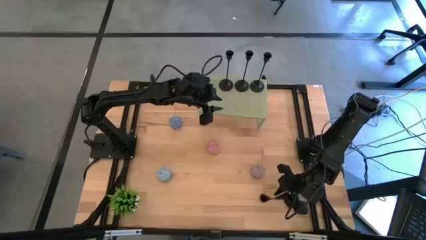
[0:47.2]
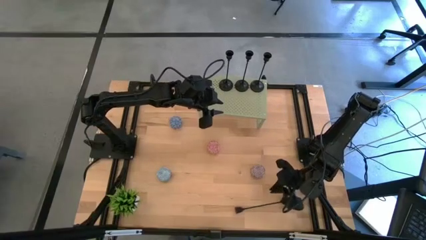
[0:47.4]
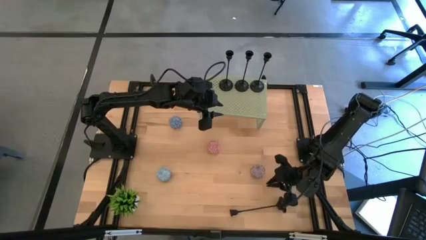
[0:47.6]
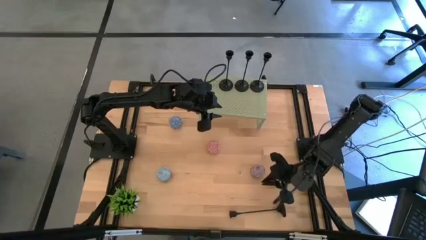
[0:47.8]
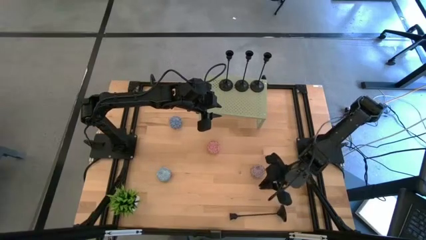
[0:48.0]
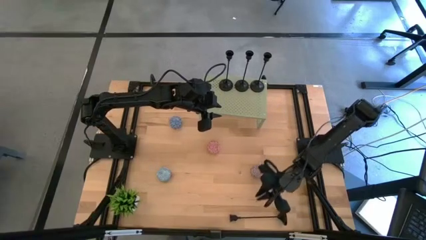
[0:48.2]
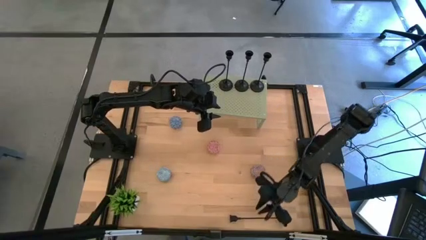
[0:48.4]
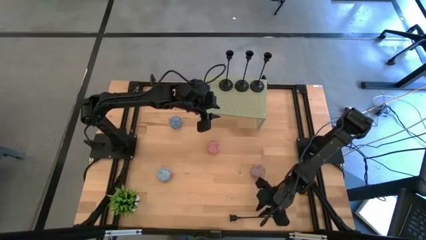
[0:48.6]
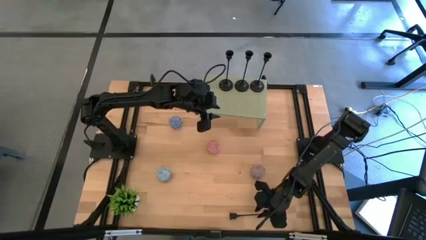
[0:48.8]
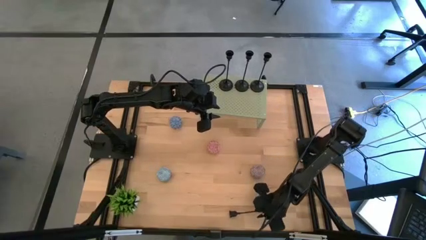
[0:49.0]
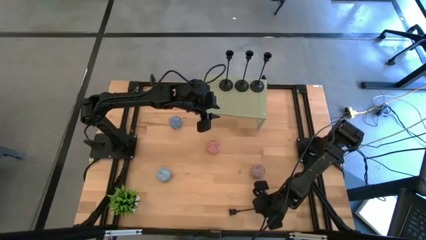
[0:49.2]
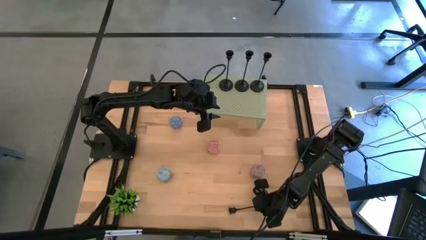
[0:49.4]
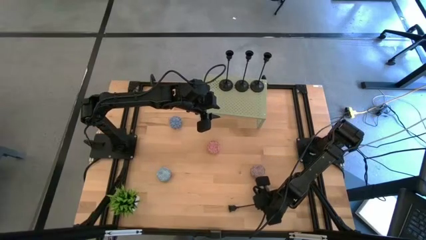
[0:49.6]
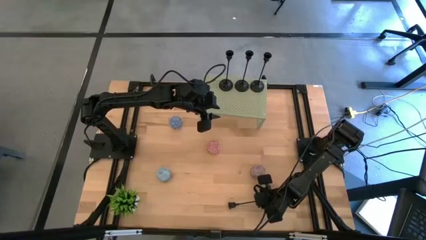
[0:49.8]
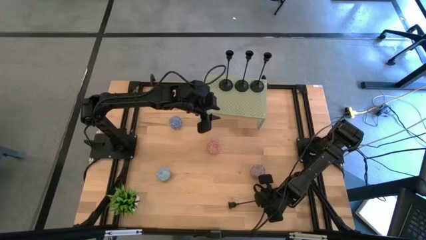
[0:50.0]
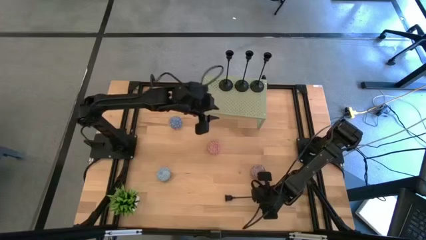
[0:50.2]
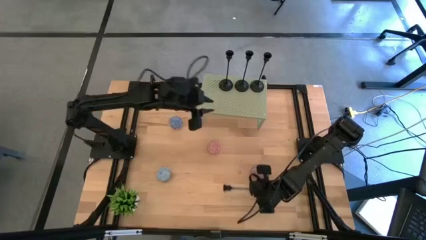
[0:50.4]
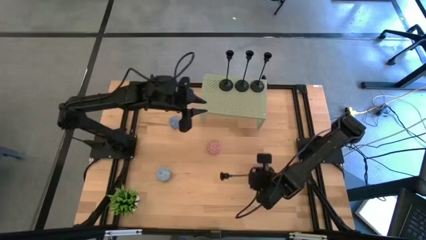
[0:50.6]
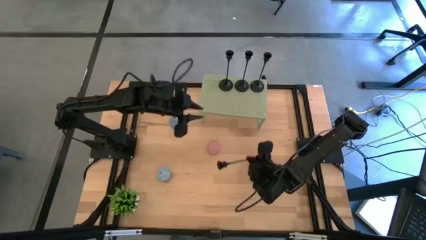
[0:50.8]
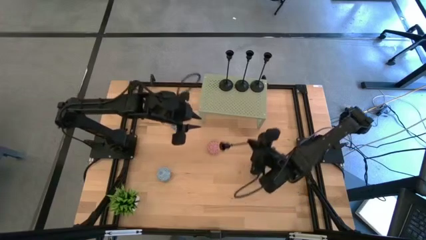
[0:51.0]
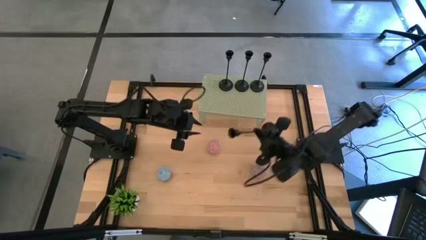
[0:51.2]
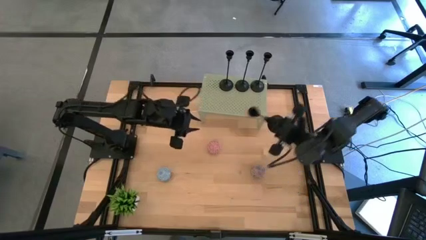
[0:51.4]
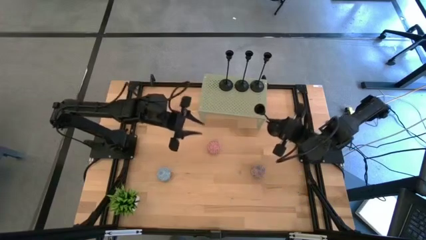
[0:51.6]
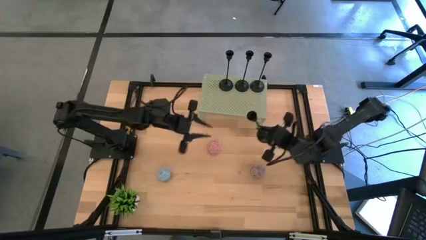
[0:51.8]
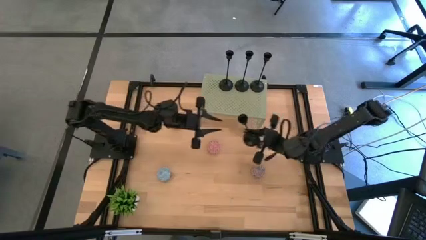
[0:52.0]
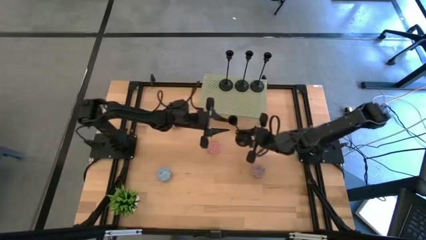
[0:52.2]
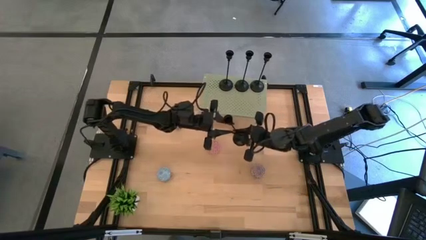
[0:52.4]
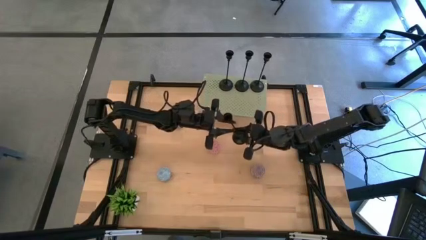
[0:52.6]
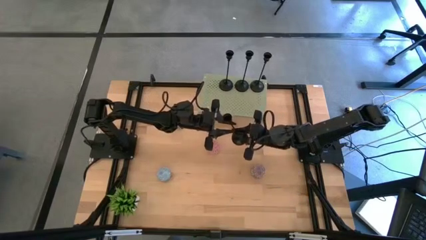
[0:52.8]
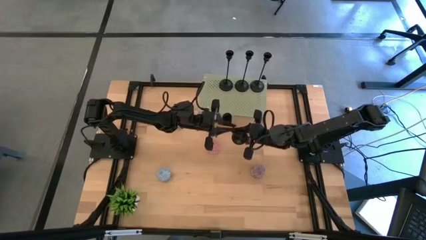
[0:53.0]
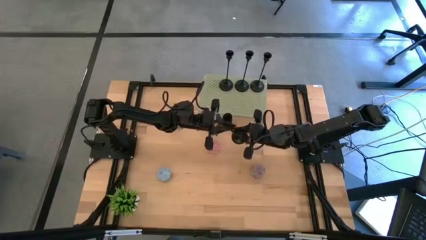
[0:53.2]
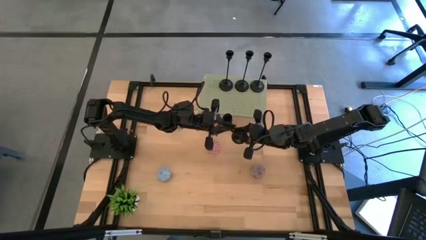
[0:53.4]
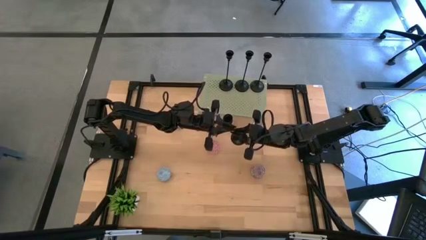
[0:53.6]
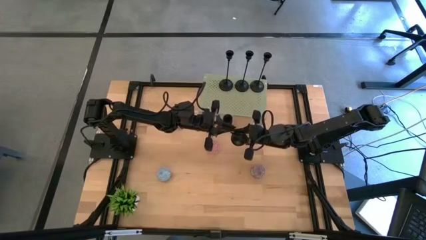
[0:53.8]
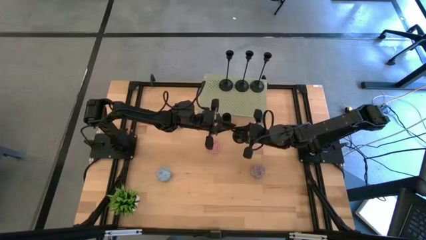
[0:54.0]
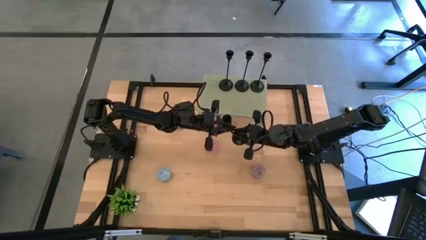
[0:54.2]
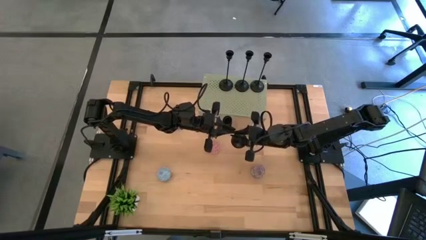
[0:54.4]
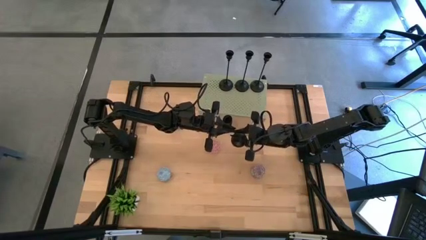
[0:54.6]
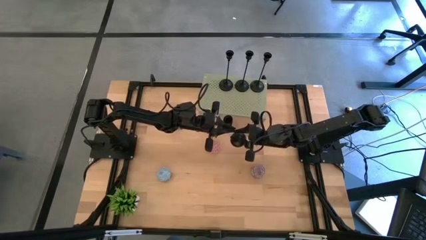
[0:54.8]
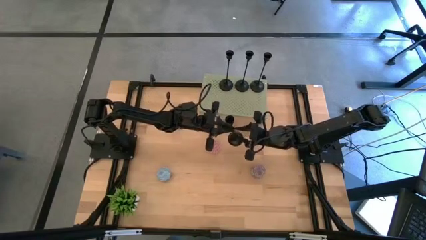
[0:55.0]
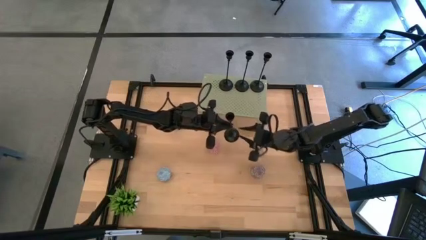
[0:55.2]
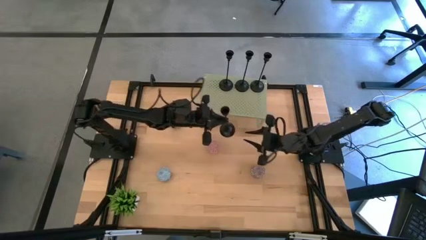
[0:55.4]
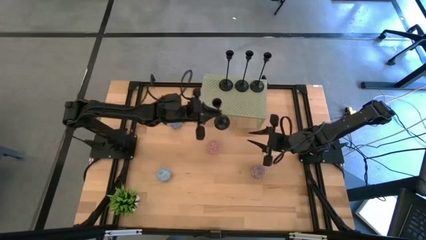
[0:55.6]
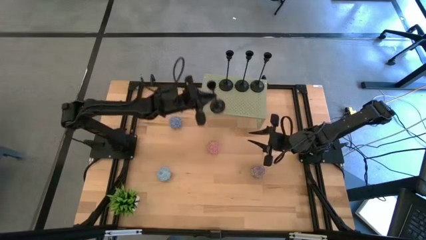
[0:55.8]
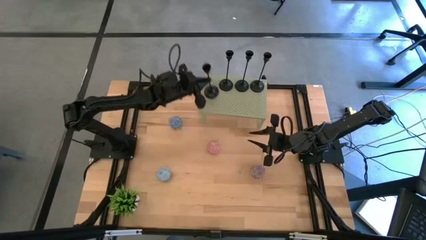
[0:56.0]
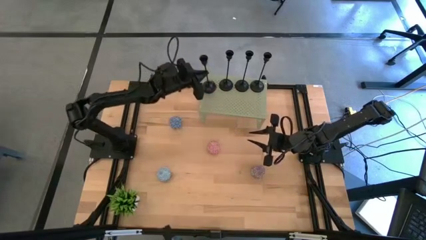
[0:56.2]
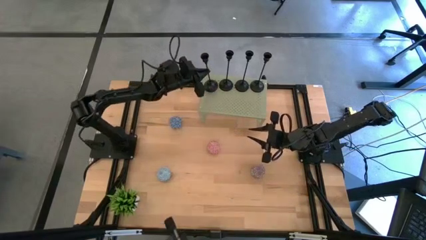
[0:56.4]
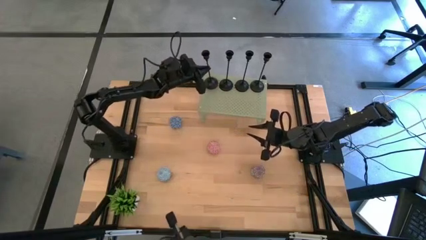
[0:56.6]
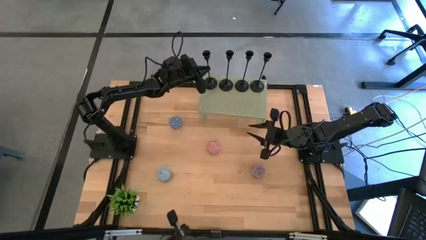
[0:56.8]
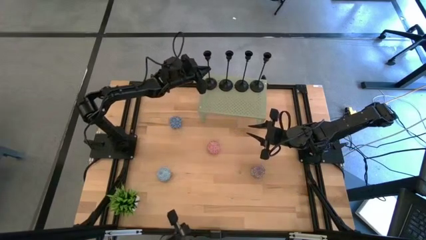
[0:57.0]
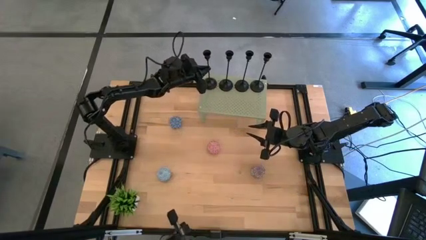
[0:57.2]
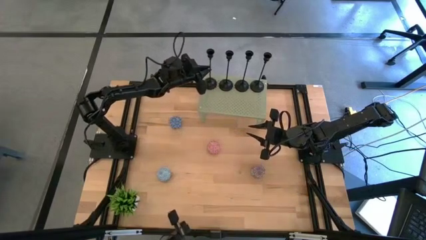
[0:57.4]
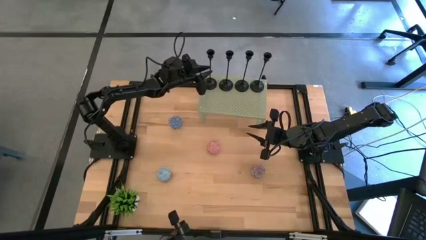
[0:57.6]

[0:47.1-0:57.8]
Task: Pick & Place candle stick holders
Put the black candle holder on the shelf

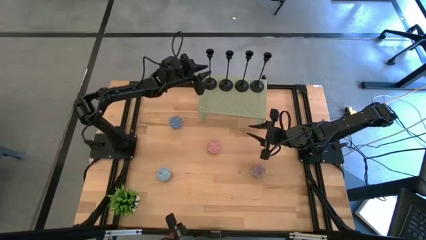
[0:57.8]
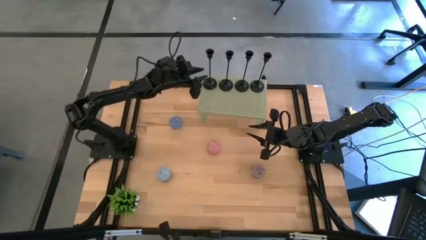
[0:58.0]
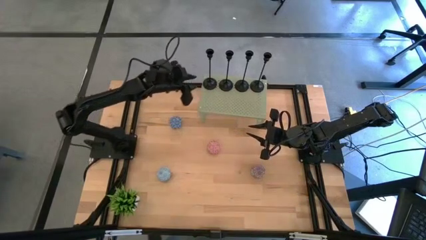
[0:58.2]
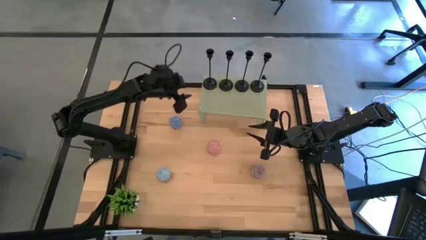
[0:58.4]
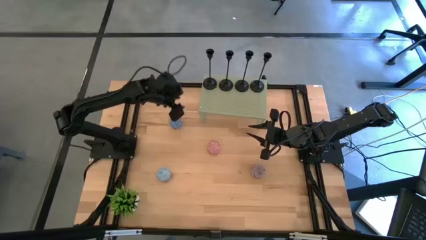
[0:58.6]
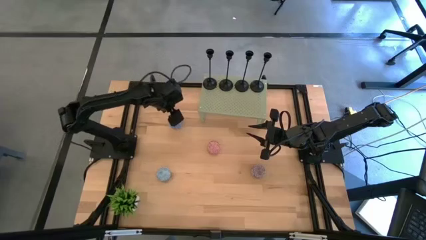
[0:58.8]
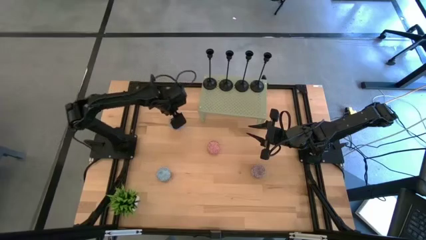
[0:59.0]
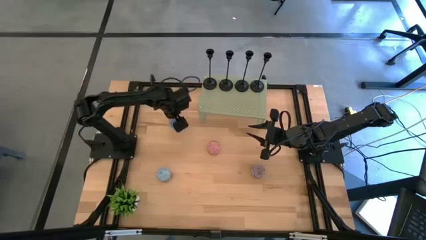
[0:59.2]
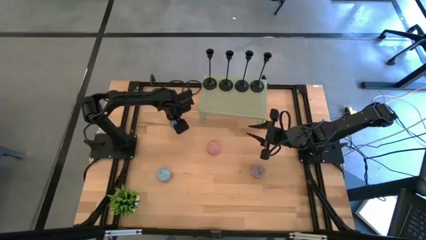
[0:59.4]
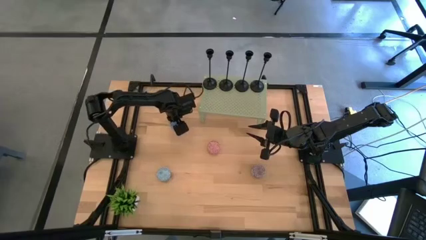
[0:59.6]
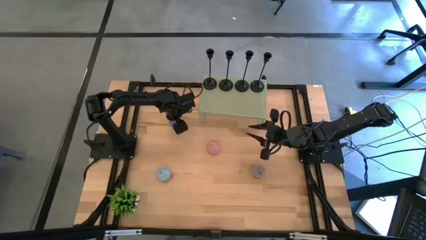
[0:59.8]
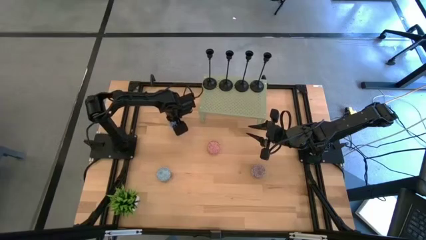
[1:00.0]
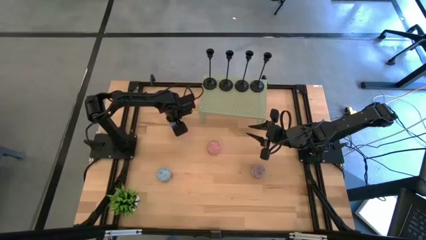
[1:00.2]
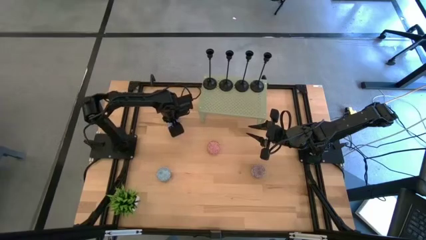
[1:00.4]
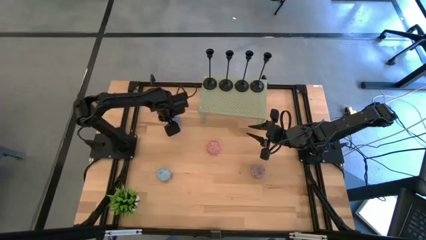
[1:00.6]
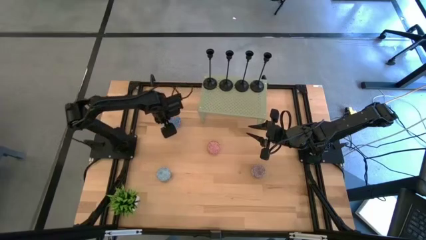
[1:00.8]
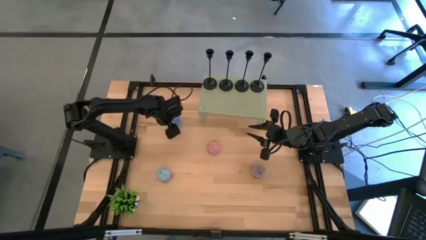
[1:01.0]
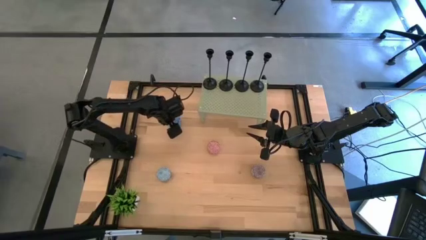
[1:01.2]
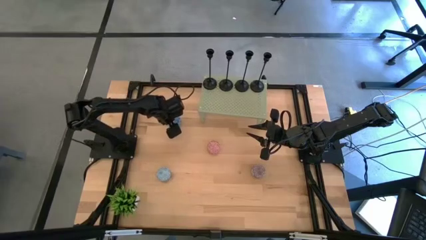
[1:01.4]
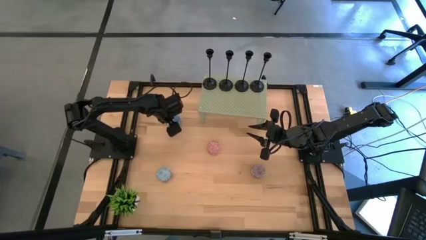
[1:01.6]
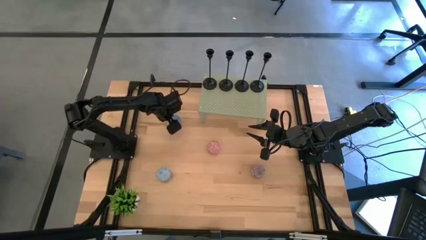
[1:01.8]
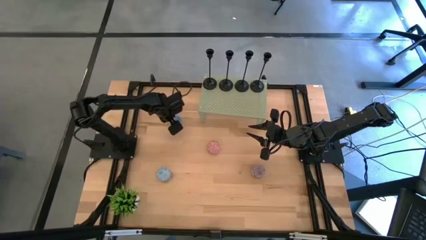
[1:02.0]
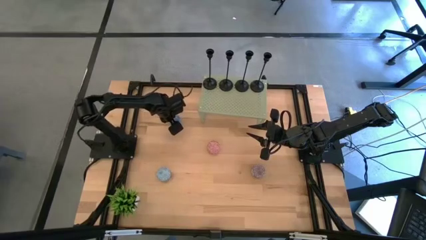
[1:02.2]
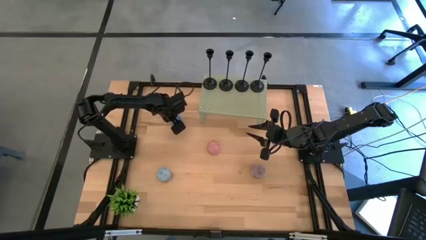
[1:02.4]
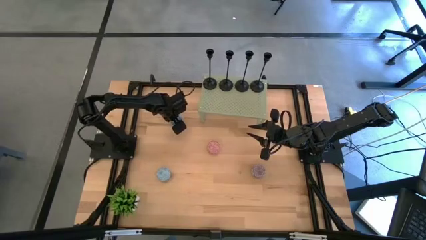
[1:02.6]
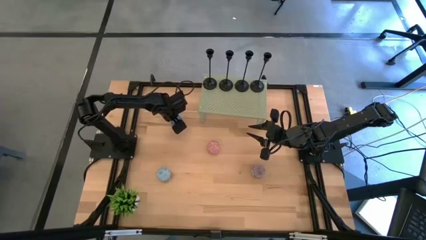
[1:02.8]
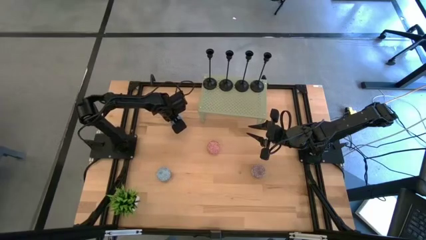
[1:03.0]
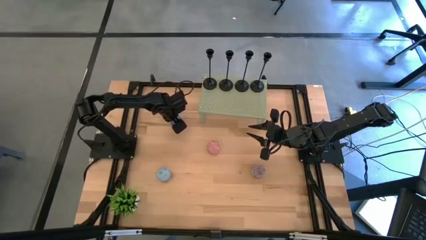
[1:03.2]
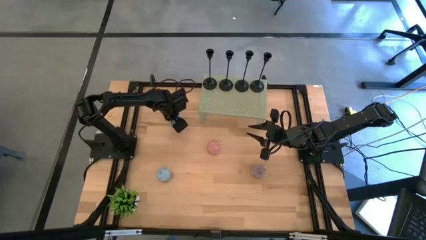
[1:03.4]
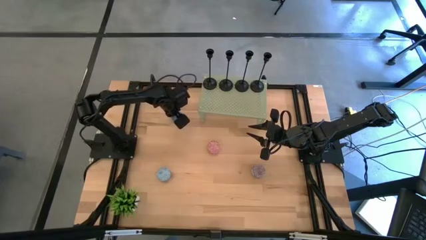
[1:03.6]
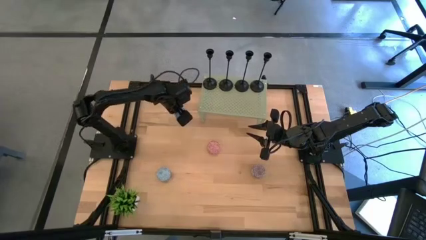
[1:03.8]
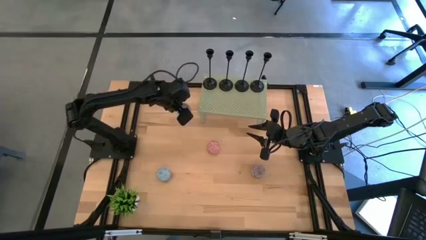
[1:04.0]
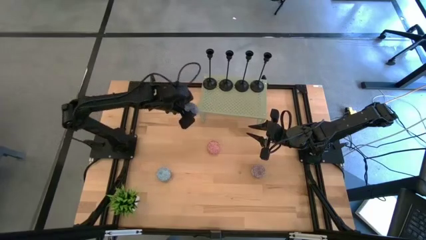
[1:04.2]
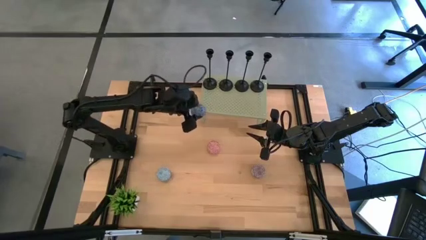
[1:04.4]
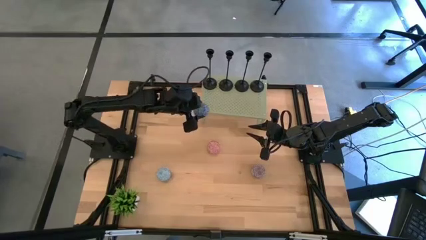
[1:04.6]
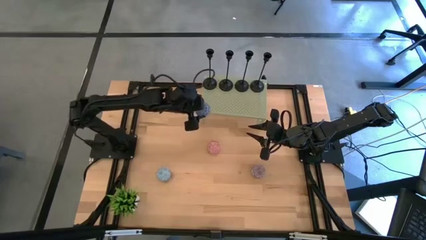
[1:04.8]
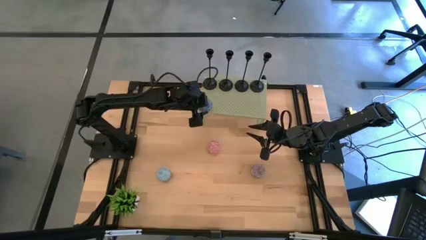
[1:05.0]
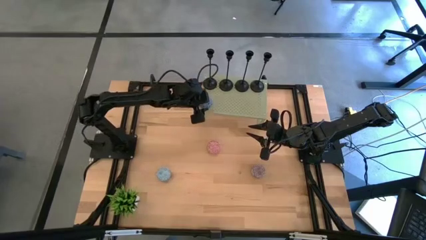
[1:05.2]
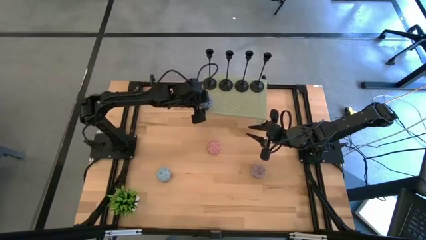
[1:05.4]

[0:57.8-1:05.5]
Put the blue scented candle on the shelf
